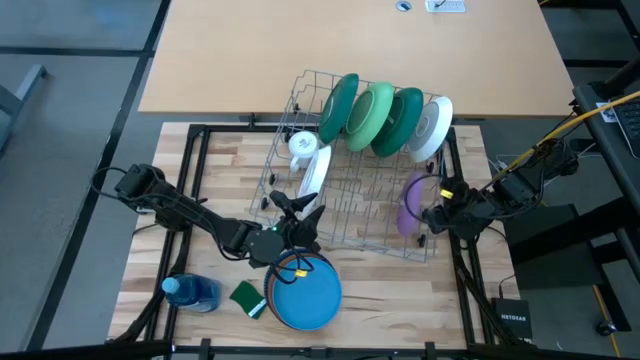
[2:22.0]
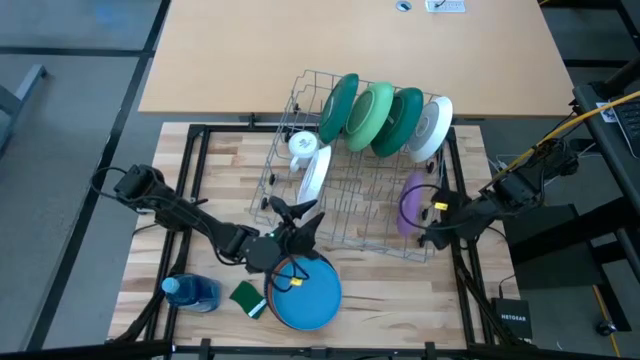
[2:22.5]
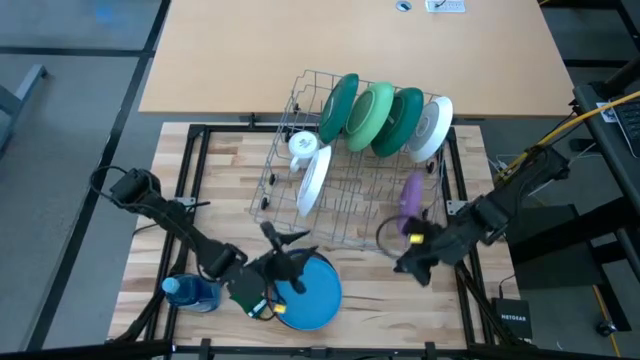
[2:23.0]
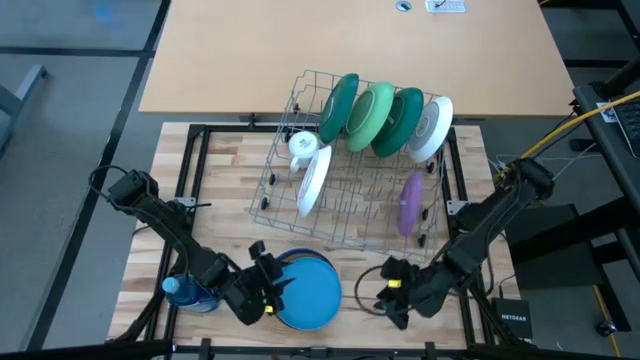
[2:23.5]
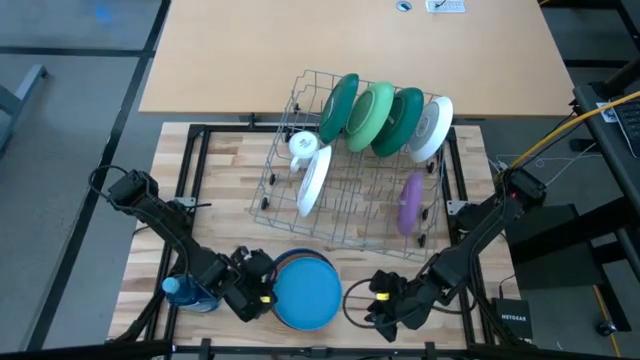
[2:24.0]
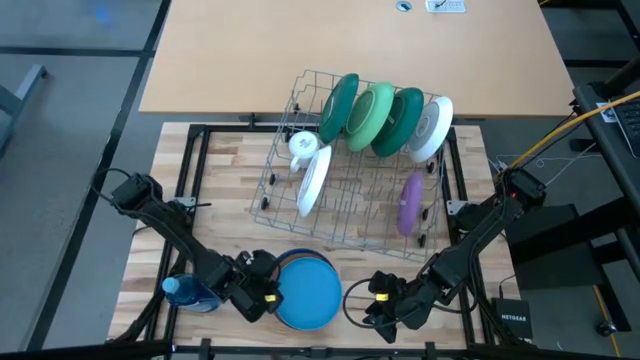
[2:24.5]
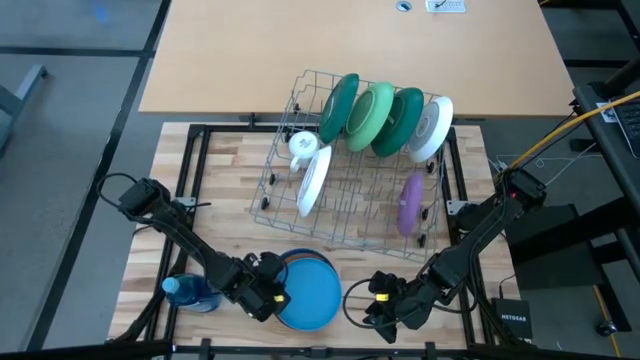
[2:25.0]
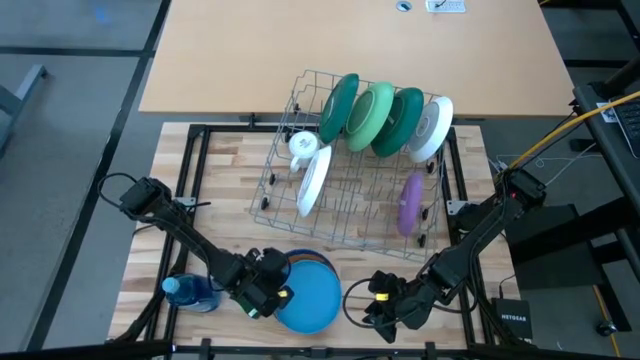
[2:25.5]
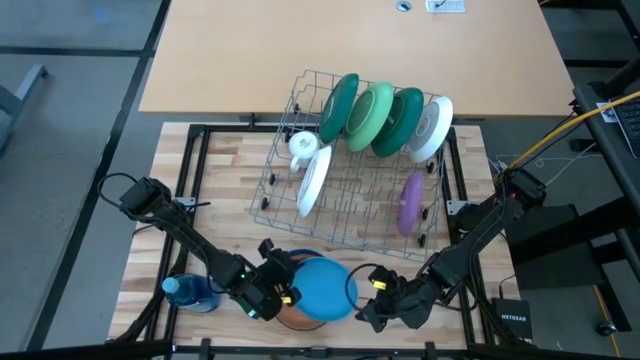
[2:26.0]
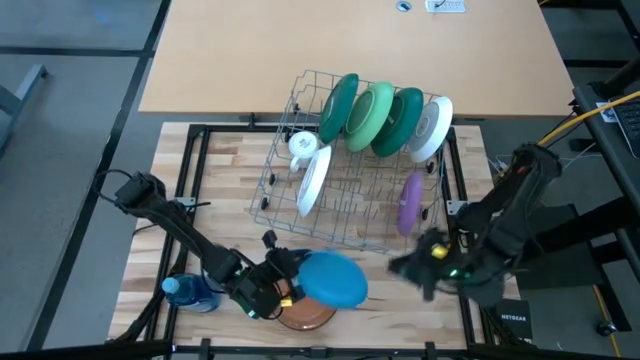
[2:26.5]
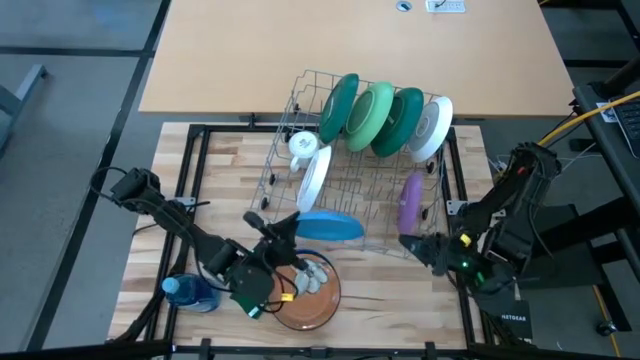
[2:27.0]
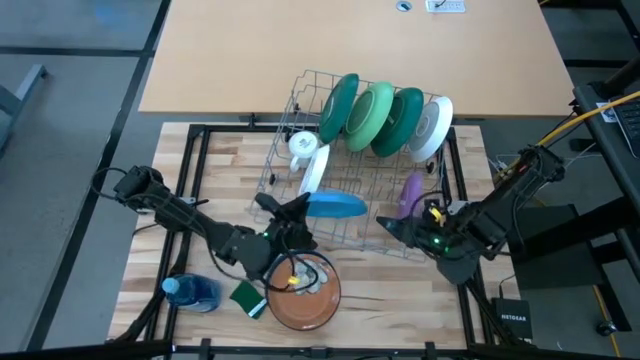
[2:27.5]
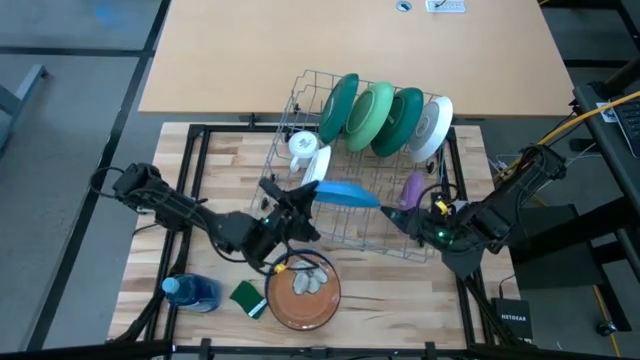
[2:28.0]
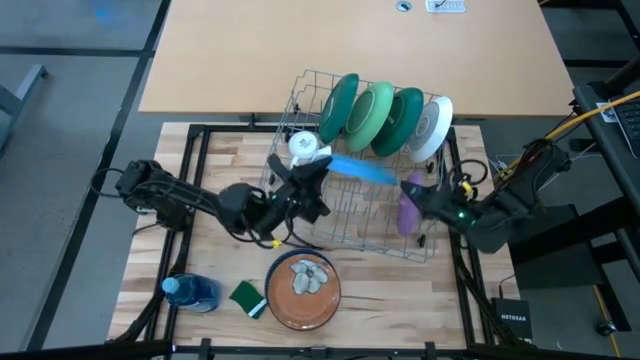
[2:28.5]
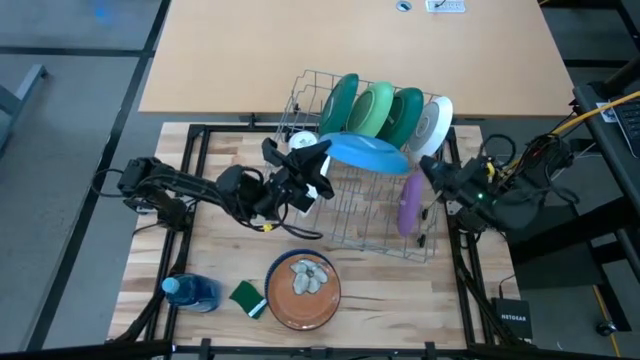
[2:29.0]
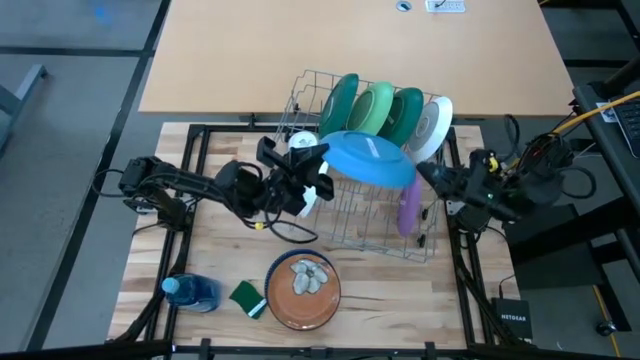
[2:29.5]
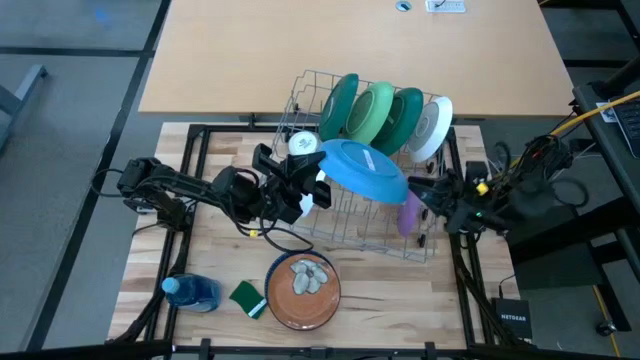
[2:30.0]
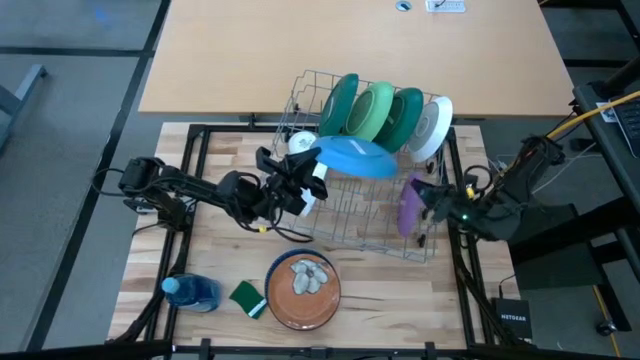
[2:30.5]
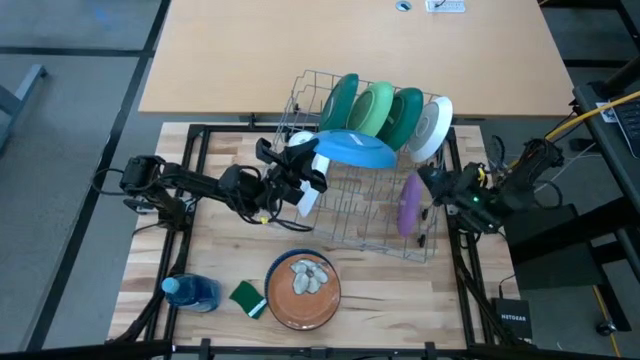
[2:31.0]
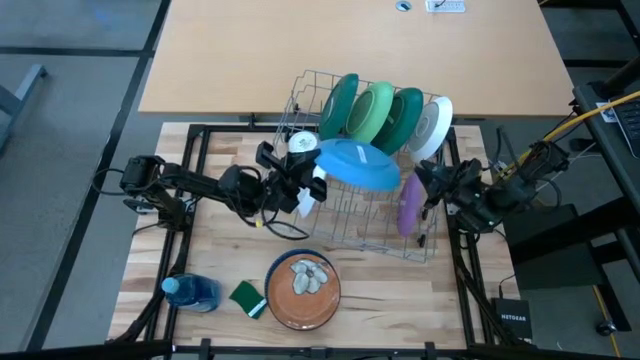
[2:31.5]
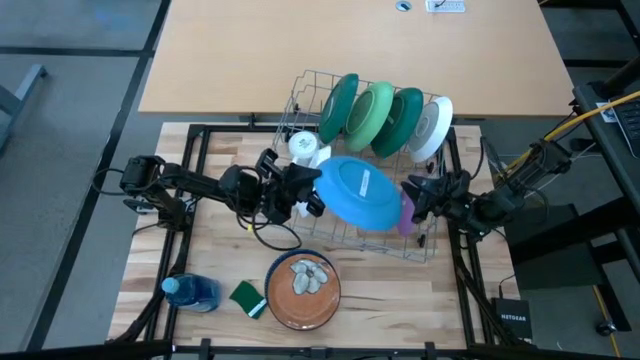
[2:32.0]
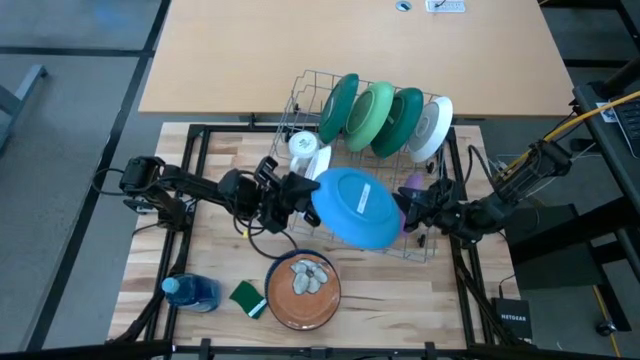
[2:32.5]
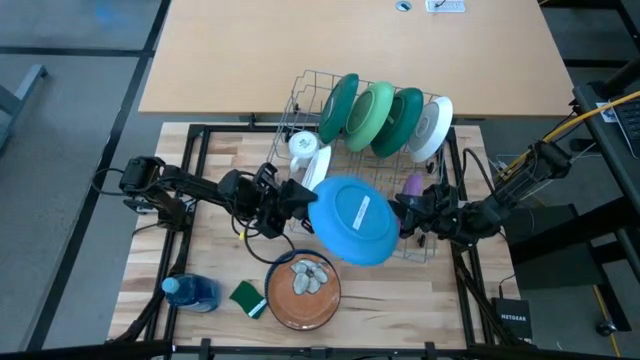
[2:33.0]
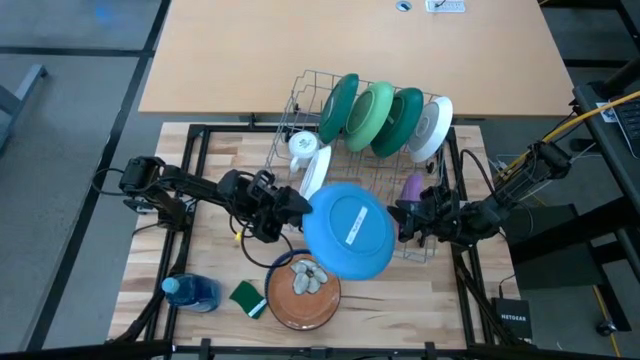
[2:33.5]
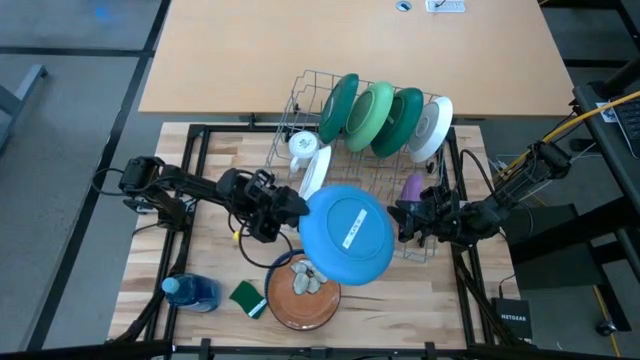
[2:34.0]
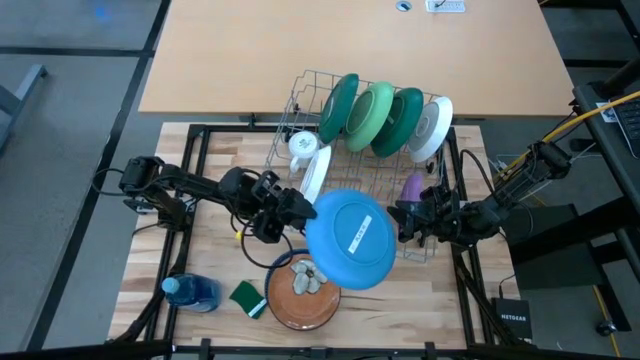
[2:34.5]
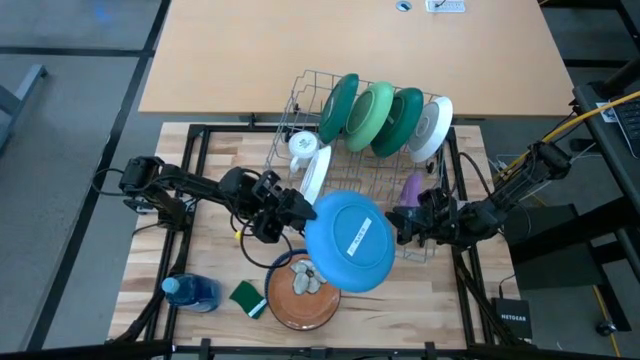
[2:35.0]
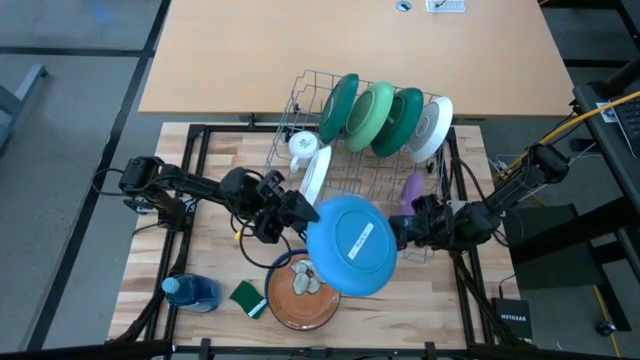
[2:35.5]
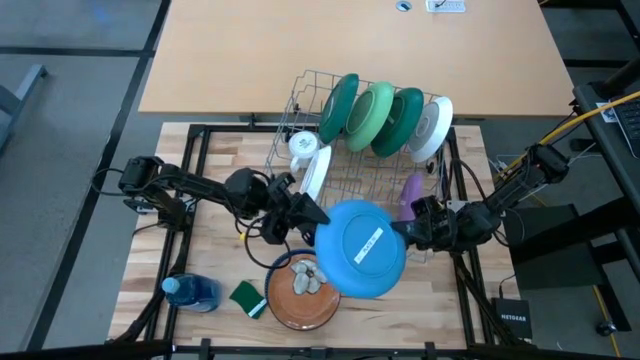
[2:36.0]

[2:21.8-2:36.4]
Task: Sort dishes
Put the blue in the dish rack

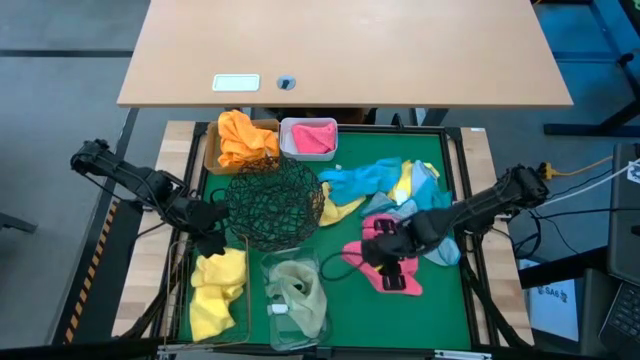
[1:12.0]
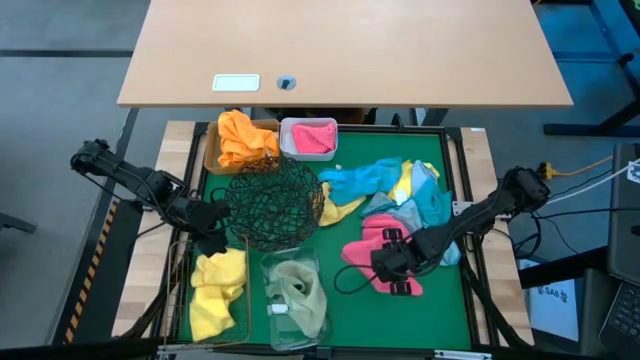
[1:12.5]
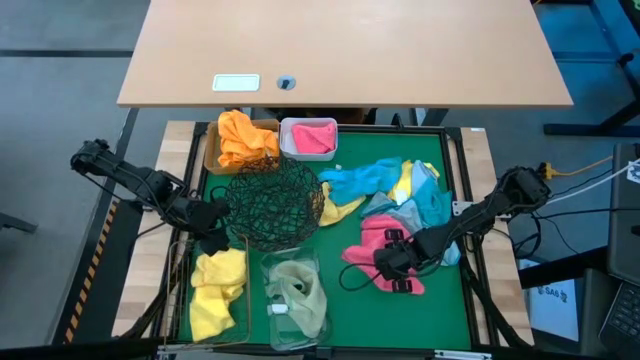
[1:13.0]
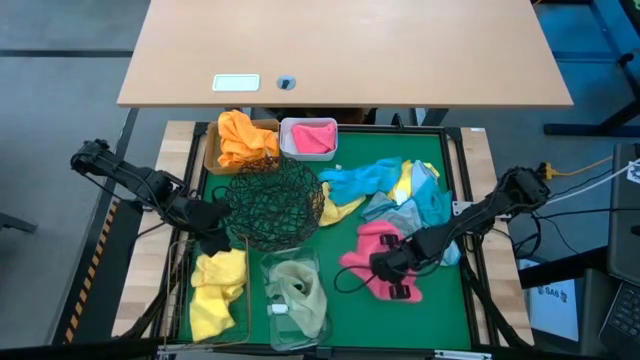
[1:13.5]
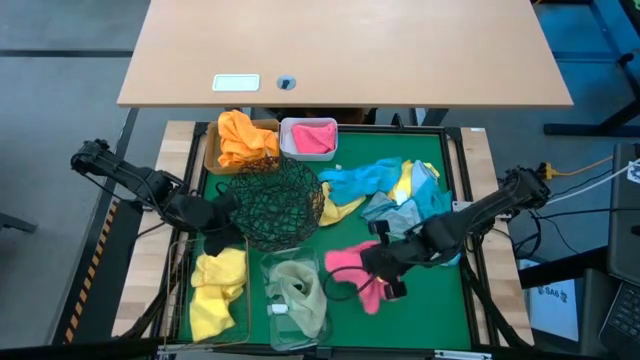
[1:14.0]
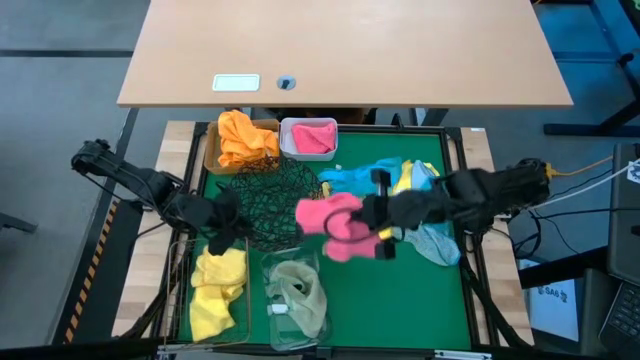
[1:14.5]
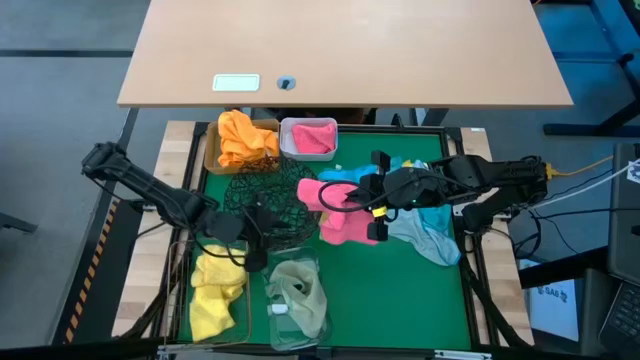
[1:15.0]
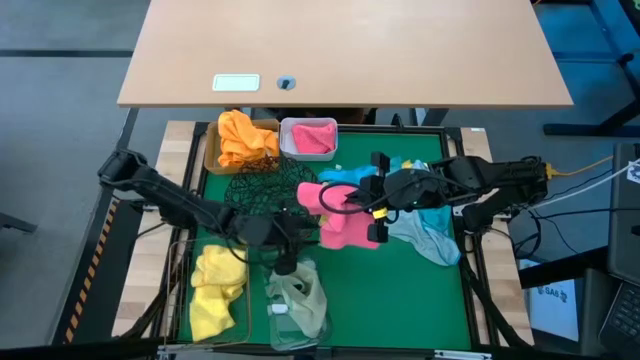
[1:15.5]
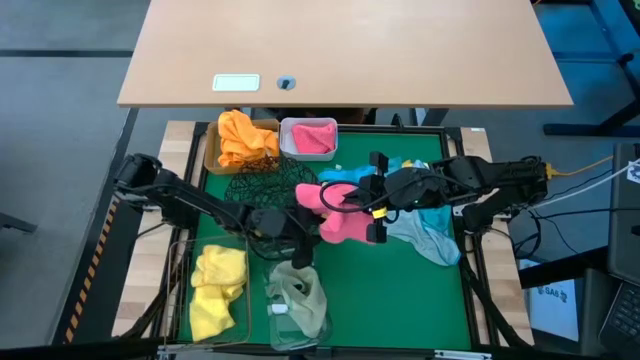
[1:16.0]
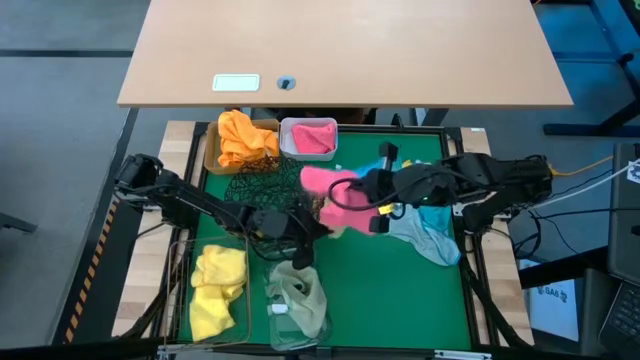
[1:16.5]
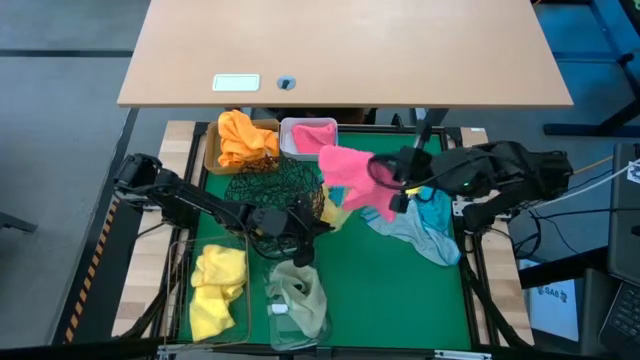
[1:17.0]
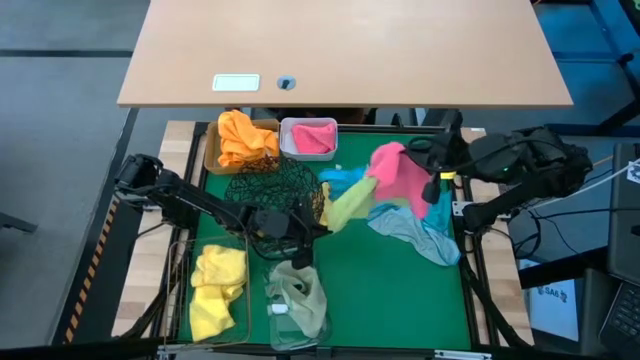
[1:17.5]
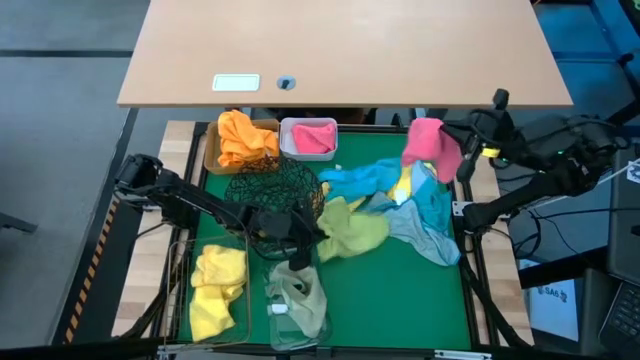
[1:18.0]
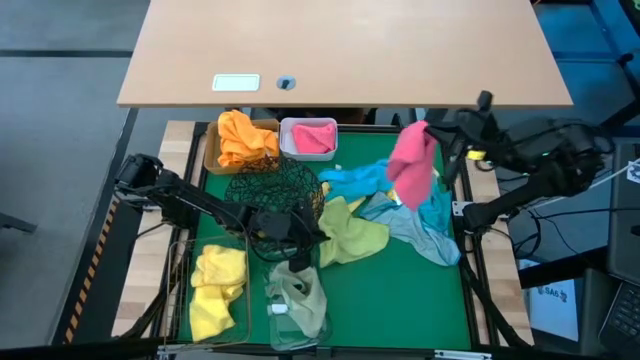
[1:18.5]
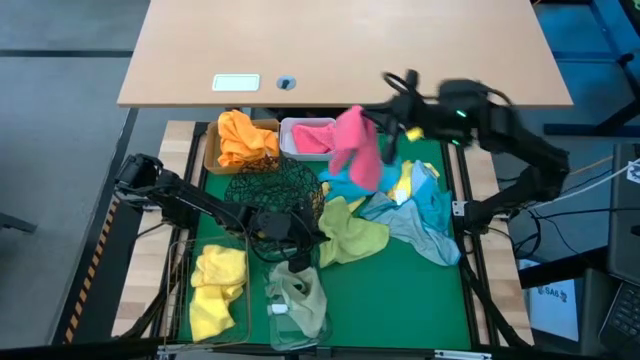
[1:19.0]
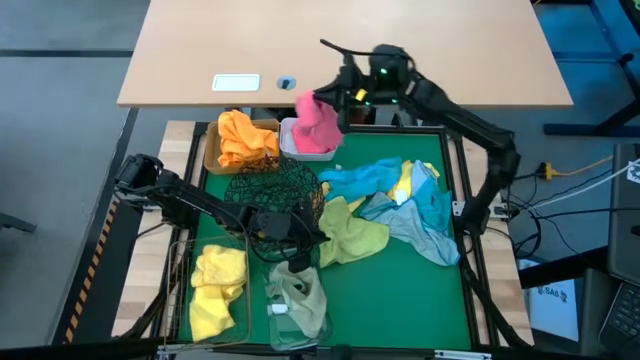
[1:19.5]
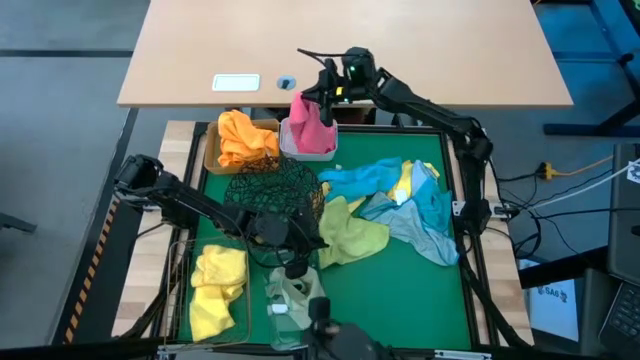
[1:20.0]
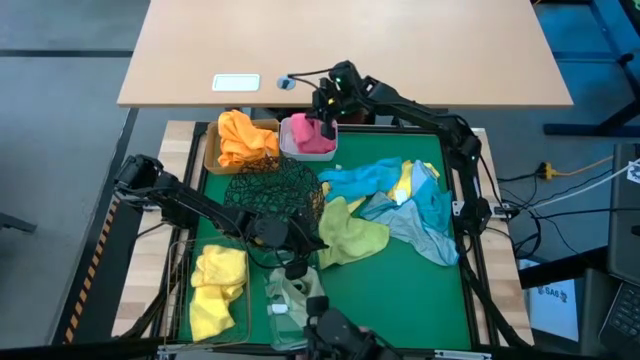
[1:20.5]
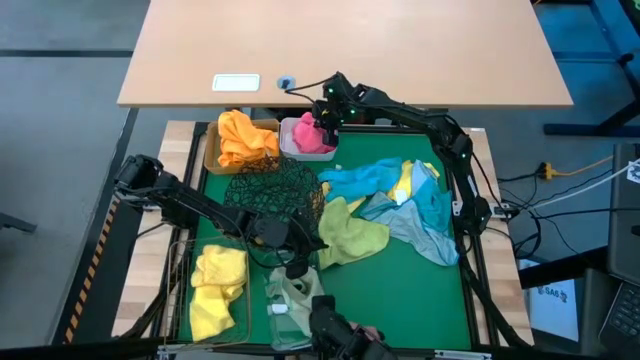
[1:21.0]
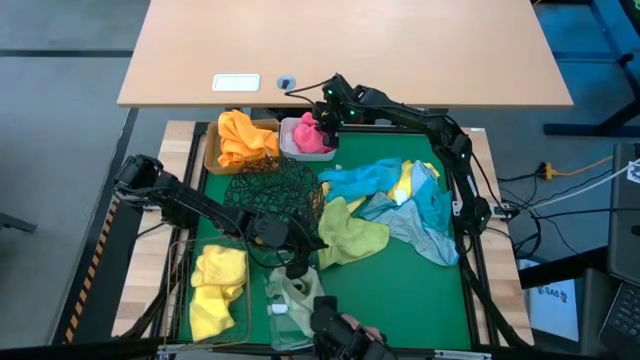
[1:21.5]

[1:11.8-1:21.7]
Task: Sort microfiber towel by color & place in baskets
Put the pink microfiber towel into the white bin
